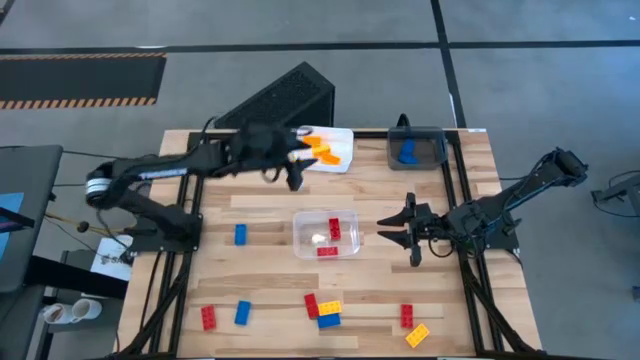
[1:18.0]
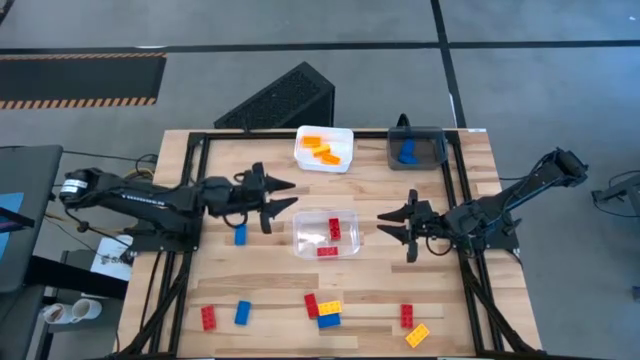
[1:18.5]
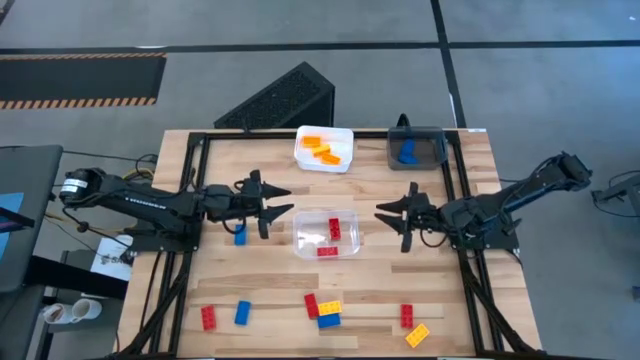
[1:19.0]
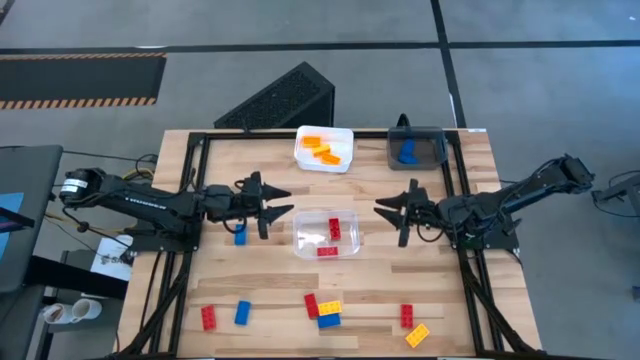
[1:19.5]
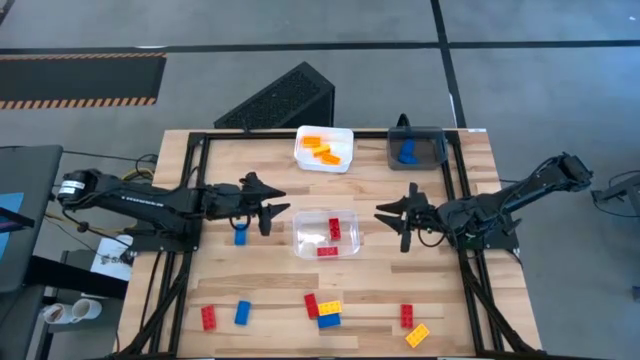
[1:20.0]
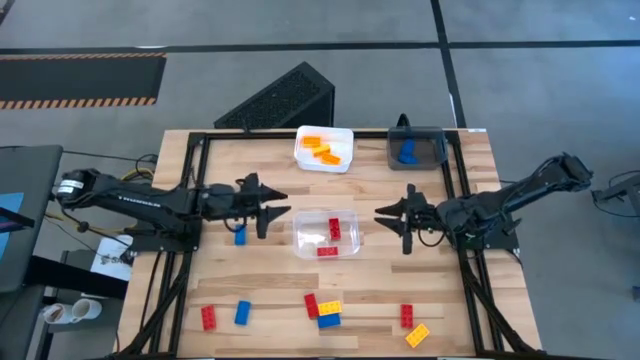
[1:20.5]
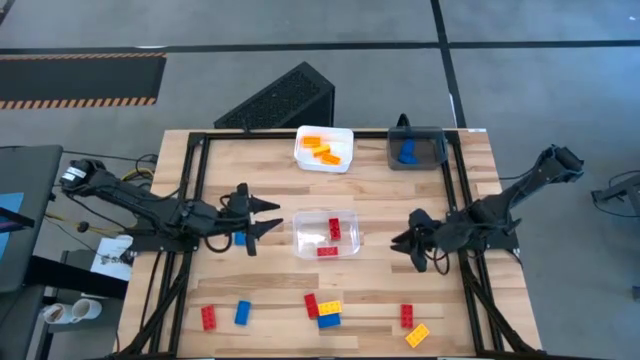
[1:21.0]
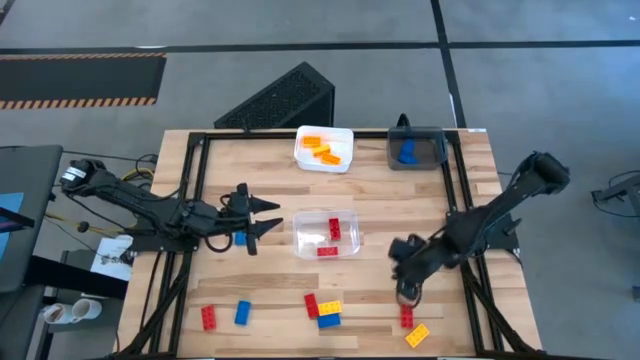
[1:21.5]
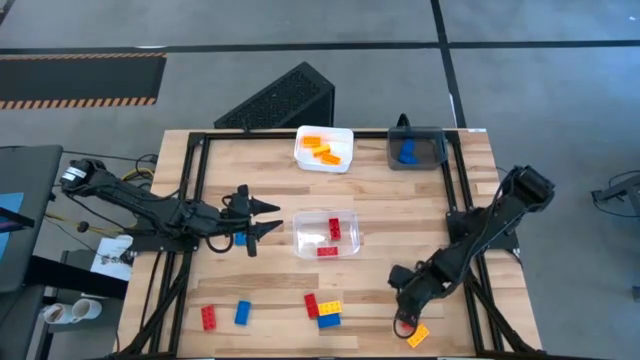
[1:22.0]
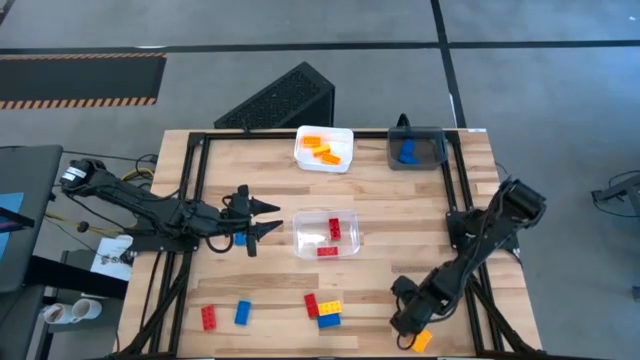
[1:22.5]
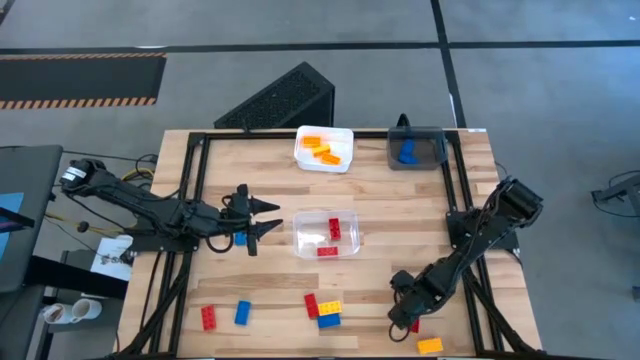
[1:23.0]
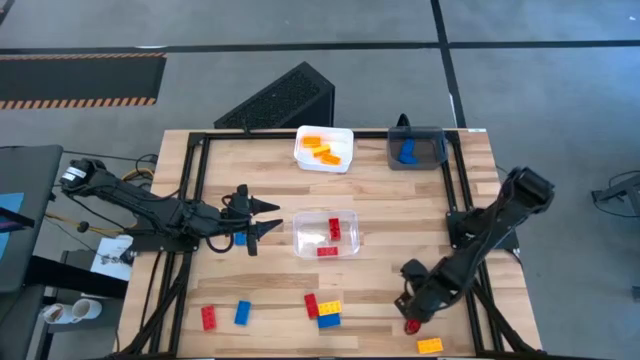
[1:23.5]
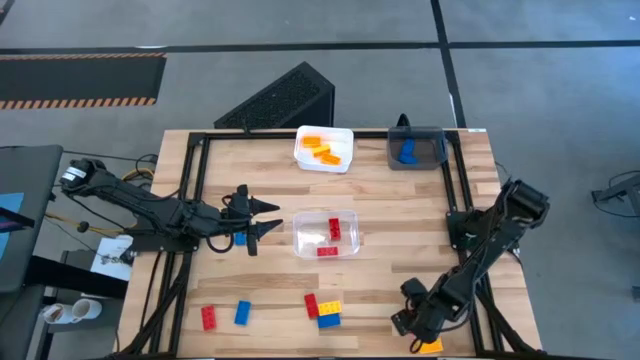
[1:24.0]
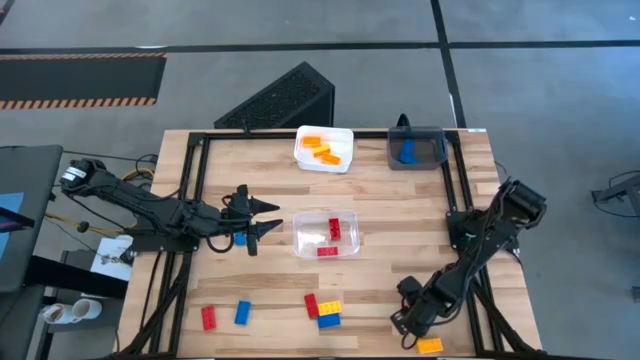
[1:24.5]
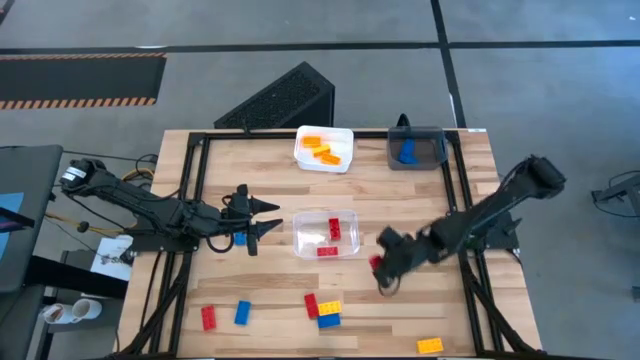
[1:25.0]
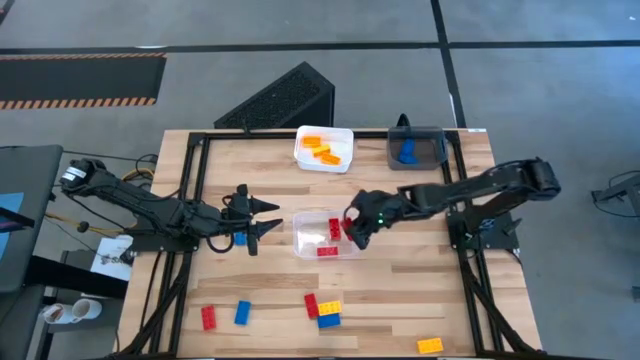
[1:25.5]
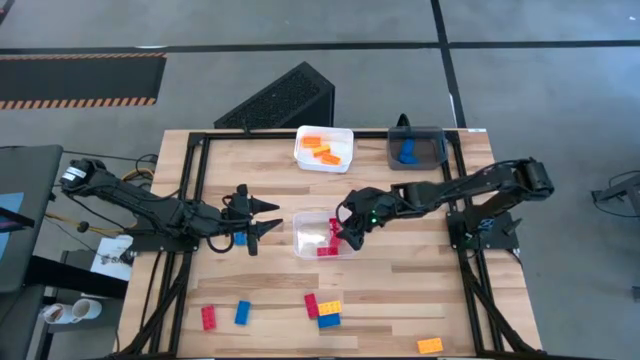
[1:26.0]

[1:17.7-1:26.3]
Task: Sort & place blocks by color
Put the red game piece into the transparent bin

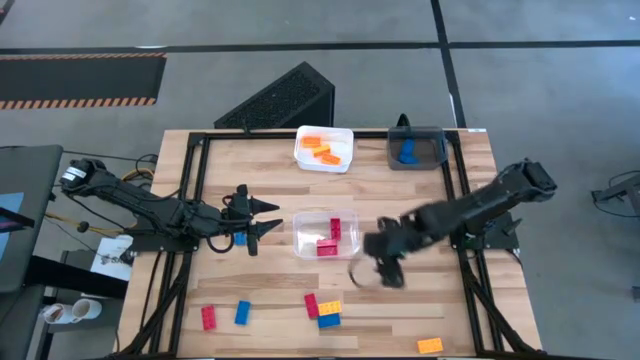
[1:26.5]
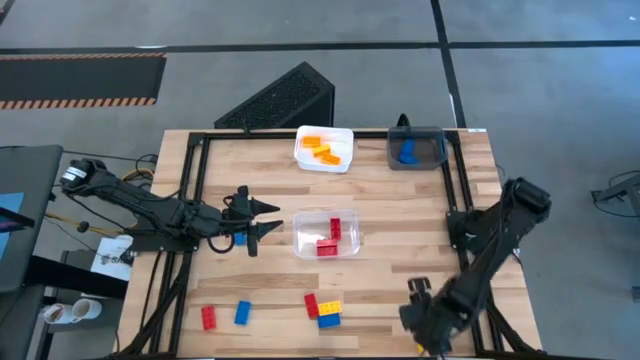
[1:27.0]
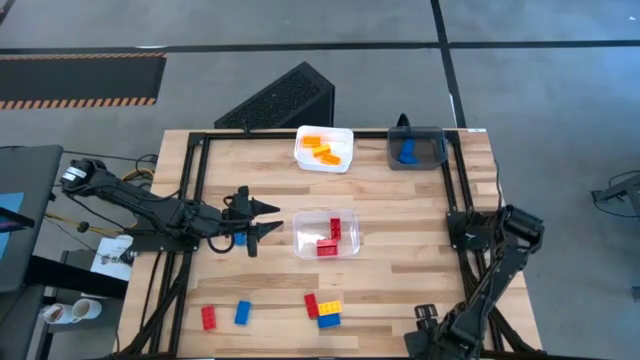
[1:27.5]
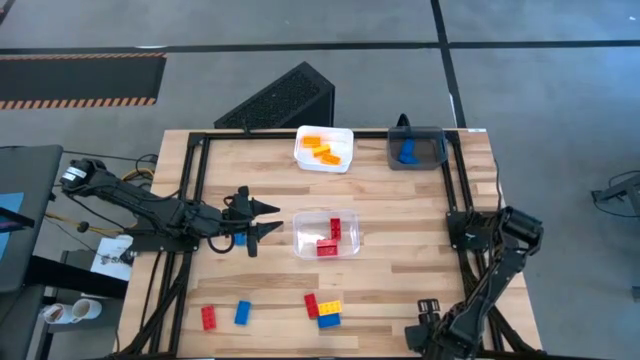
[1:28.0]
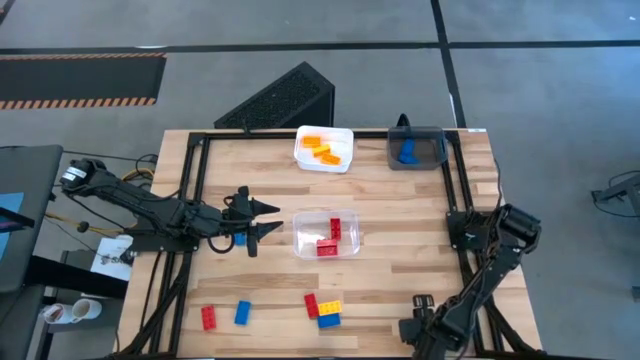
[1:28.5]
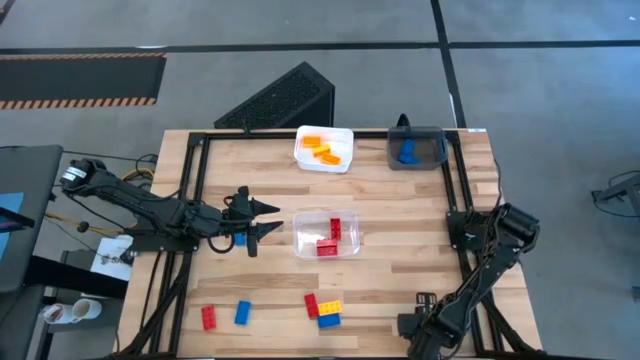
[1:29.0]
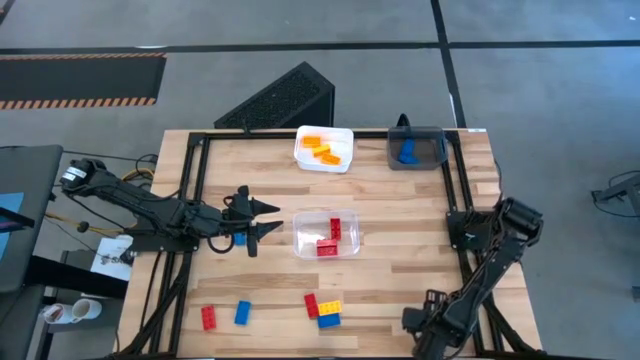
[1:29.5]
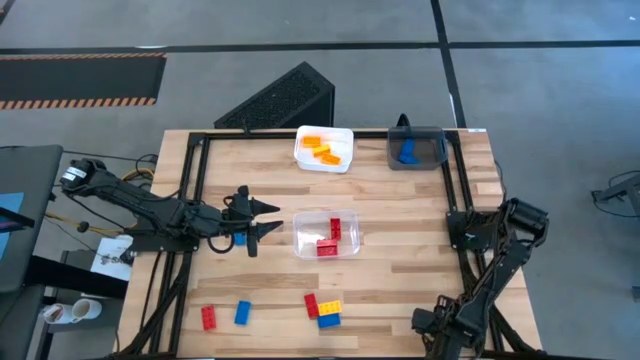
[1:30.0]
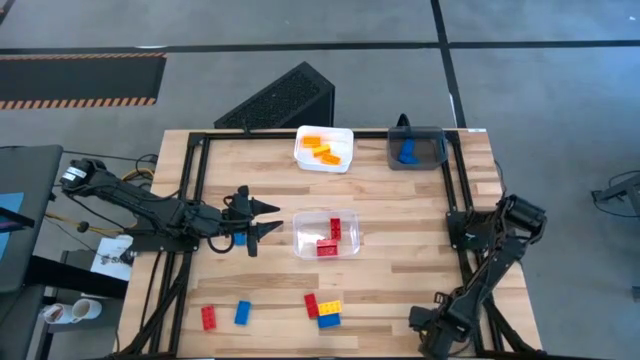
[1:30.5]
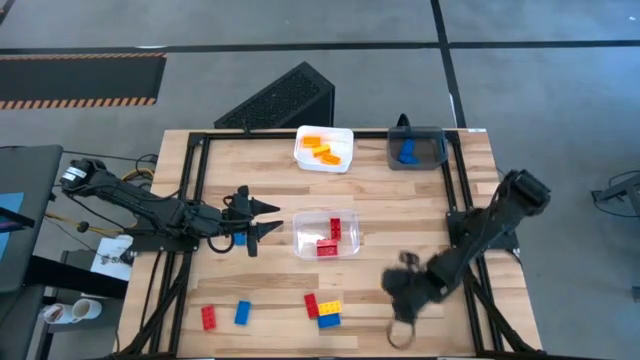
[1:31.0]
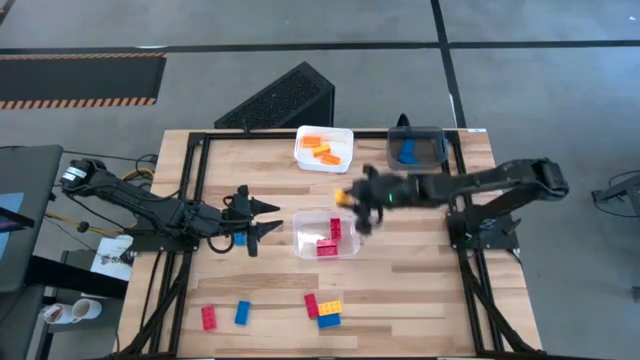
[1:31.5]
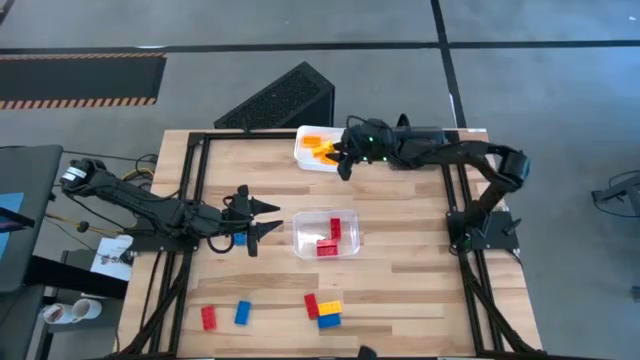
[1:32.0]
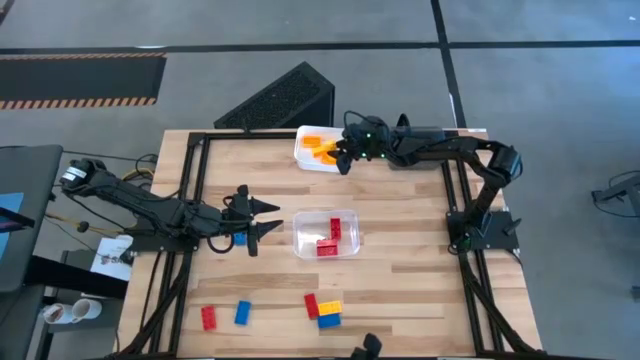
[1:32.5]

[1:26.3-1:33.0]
Put the yellow game piece into the white bin

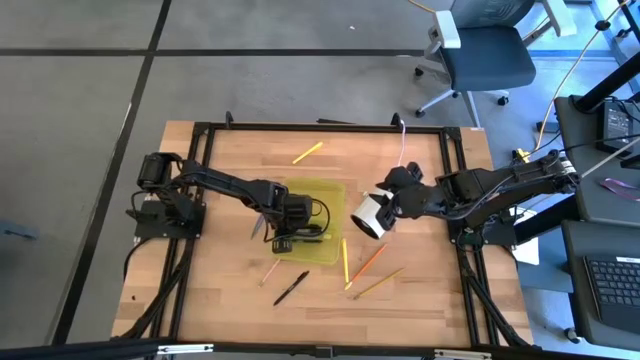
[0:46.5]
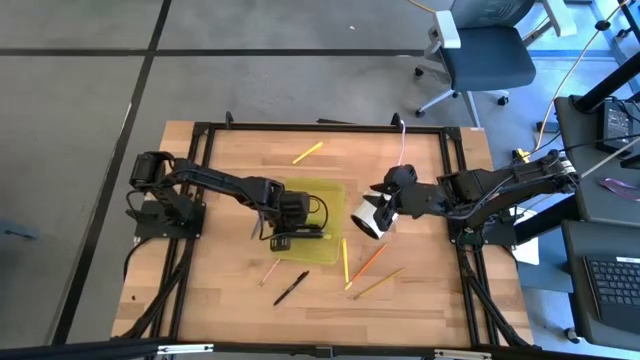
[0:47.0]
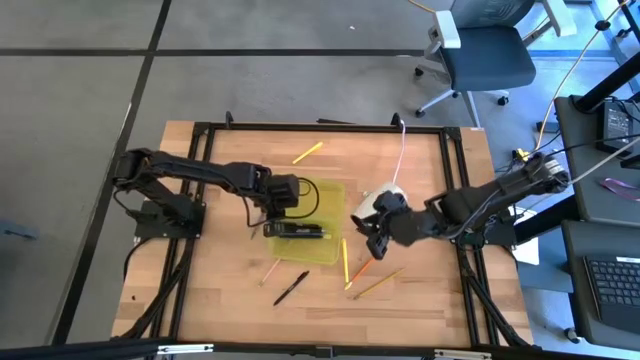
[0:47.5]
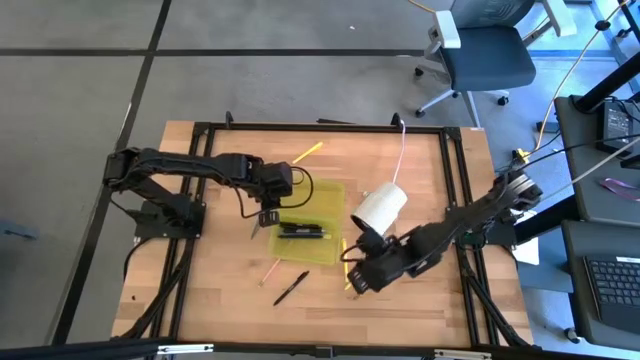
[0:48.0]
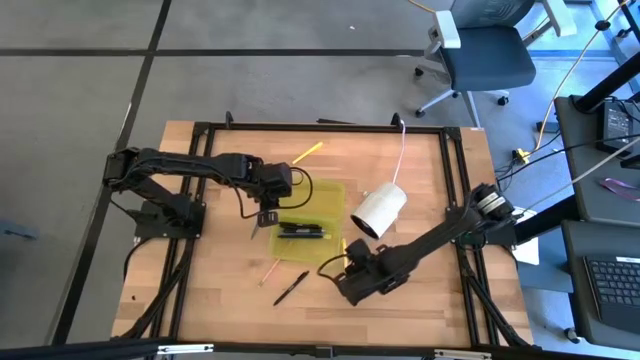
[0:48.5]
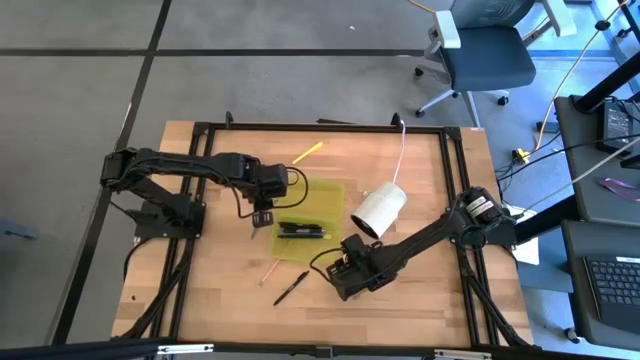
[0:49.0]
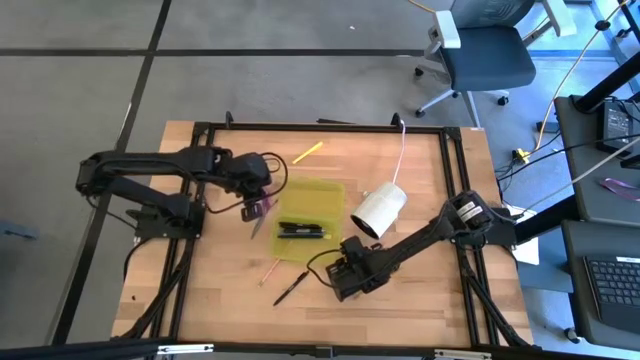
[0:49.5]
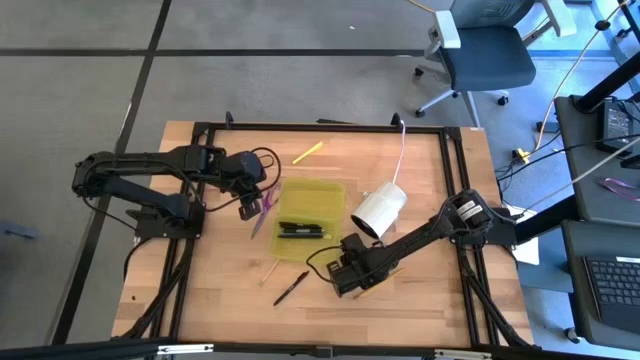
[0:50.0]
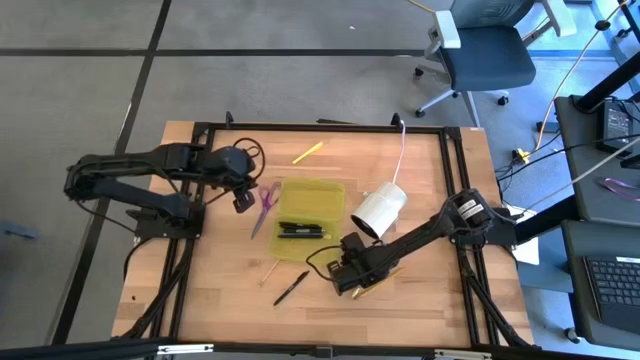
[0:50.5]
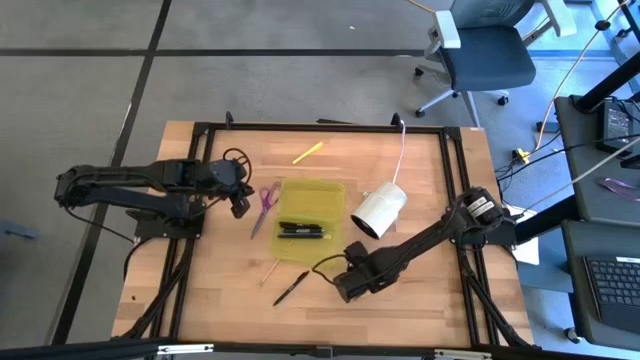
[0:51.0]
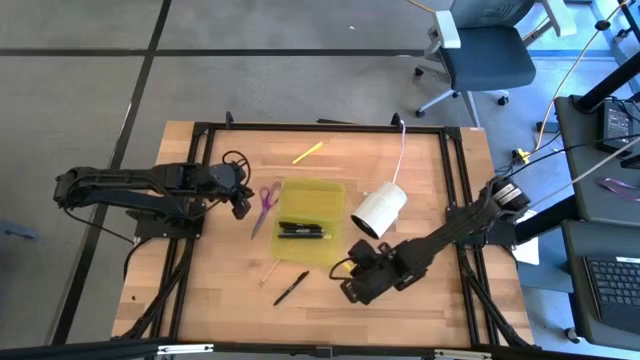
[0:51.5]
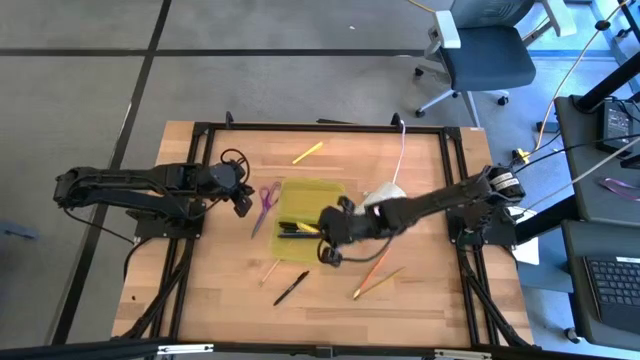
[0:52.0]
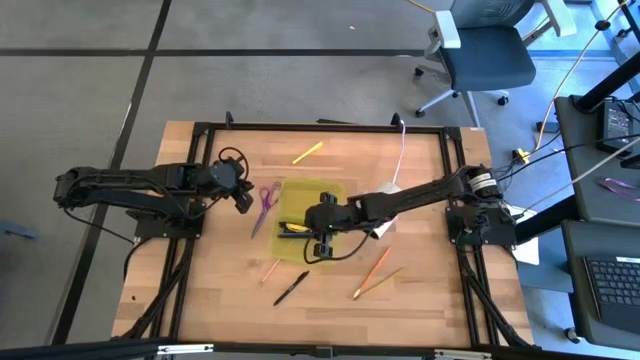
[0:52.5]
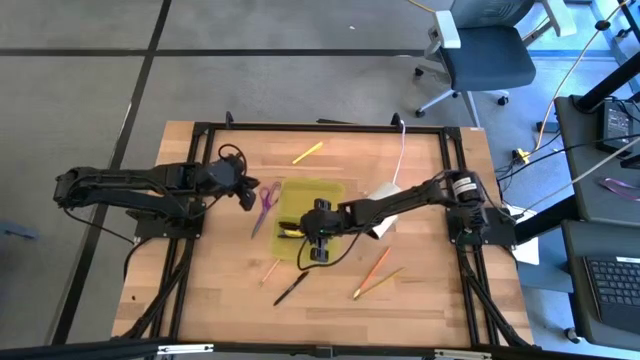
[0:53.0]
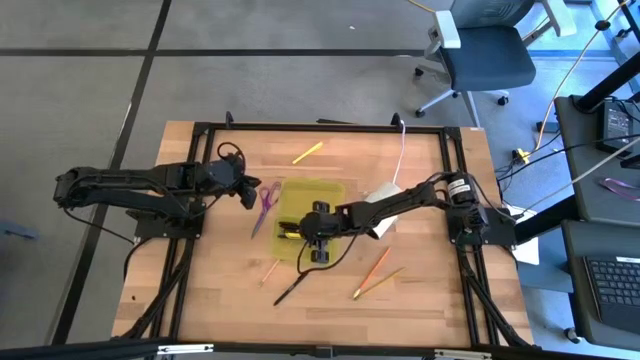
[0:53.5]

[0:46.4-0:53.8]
Task: Pick & place school supplies into a supply box
Put the yellow pen into the yellow supply box
